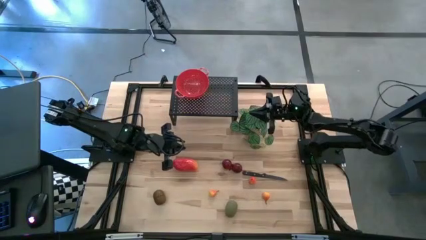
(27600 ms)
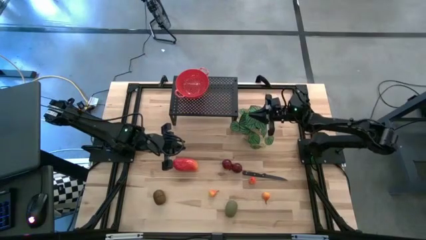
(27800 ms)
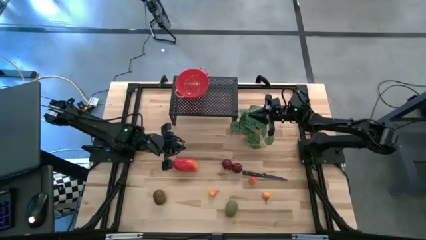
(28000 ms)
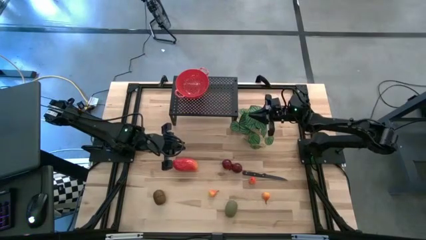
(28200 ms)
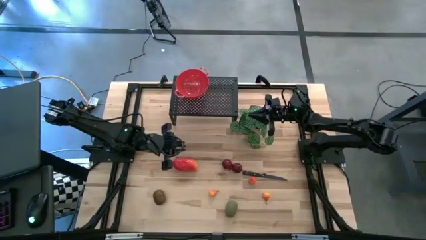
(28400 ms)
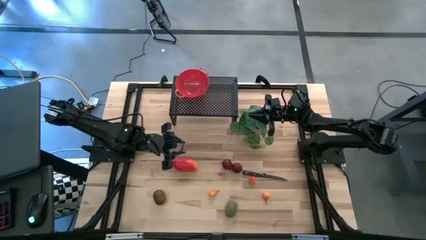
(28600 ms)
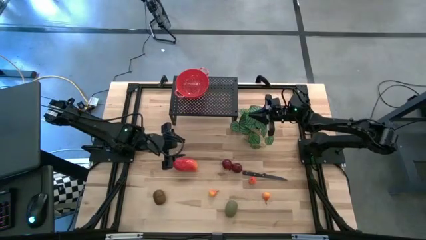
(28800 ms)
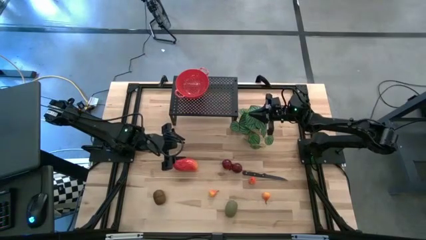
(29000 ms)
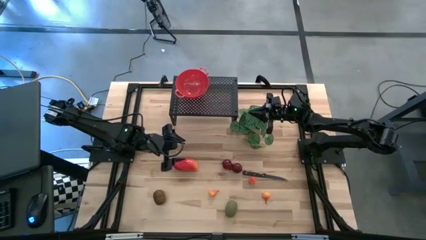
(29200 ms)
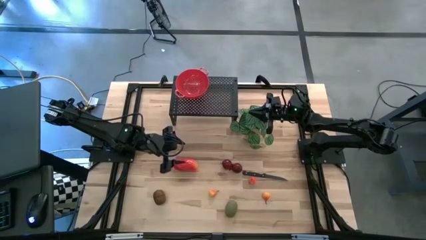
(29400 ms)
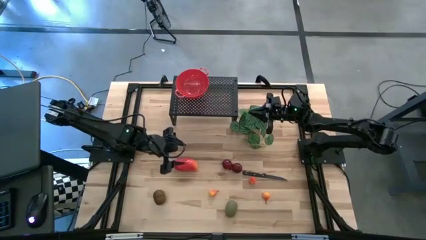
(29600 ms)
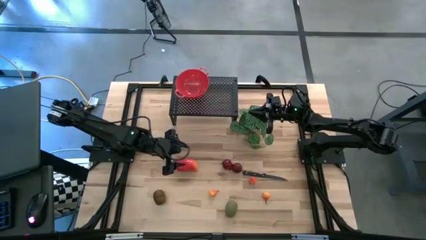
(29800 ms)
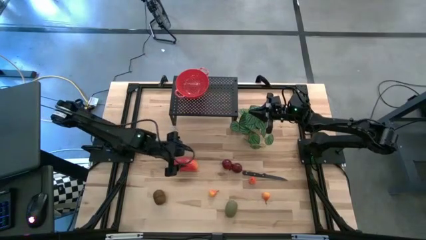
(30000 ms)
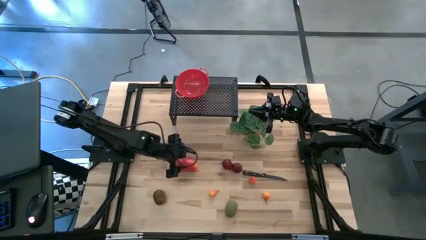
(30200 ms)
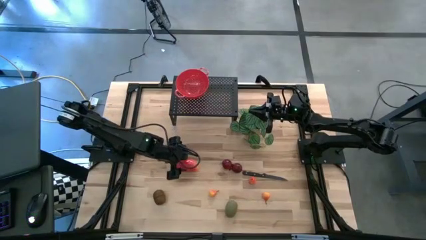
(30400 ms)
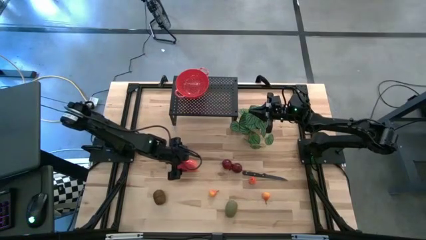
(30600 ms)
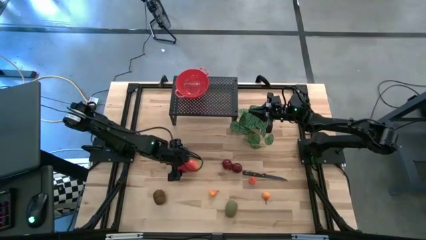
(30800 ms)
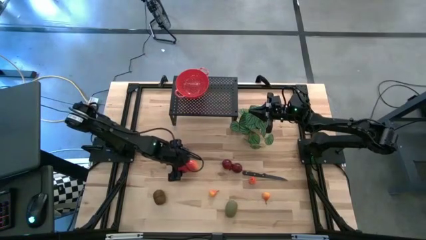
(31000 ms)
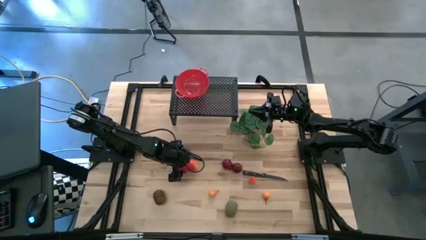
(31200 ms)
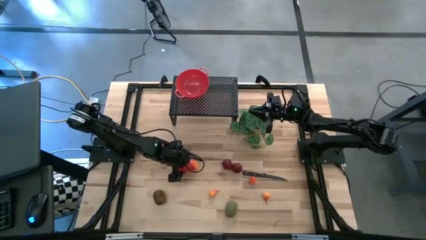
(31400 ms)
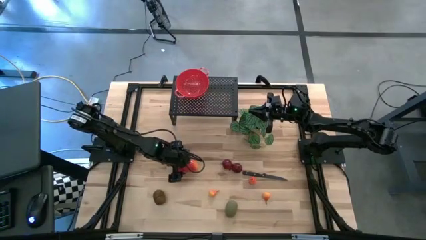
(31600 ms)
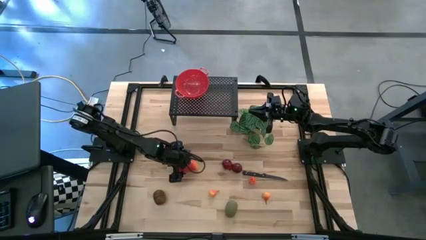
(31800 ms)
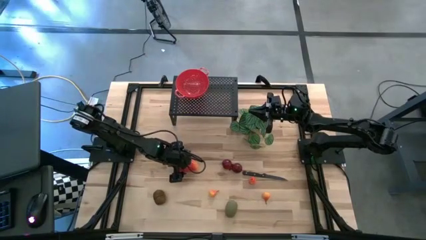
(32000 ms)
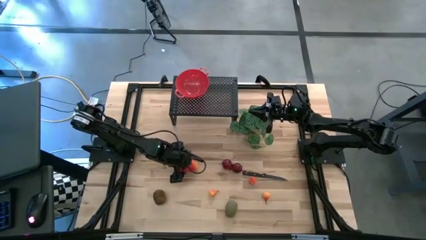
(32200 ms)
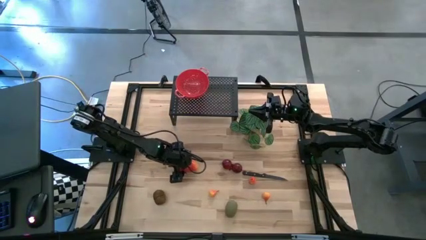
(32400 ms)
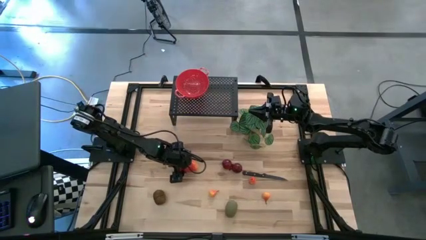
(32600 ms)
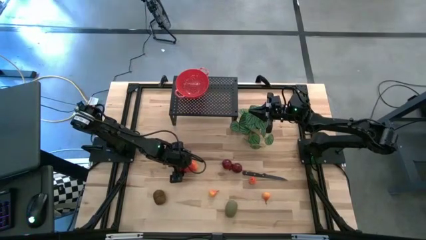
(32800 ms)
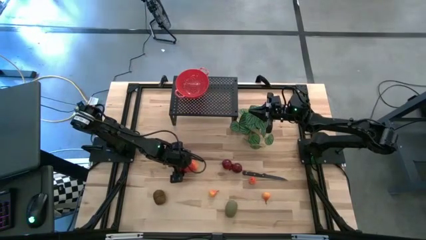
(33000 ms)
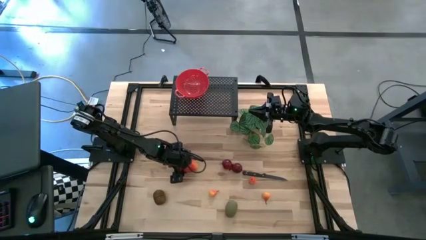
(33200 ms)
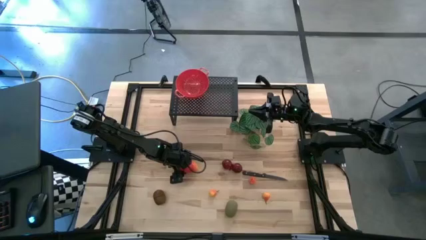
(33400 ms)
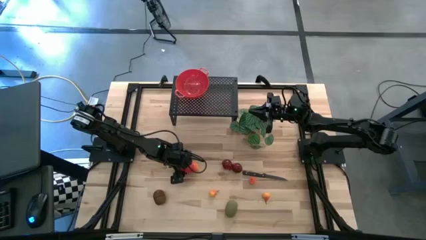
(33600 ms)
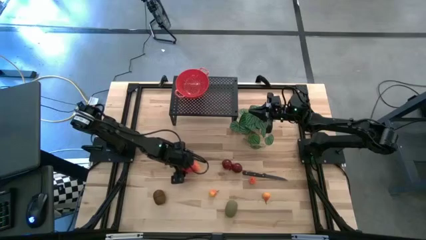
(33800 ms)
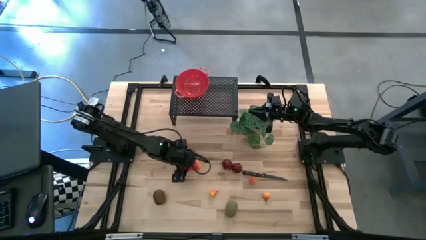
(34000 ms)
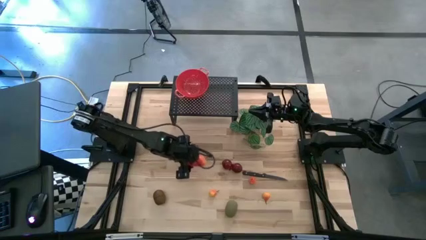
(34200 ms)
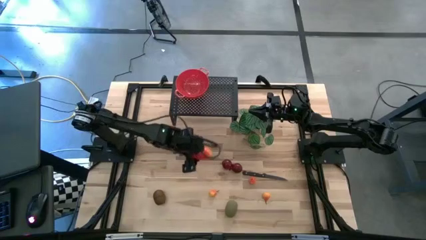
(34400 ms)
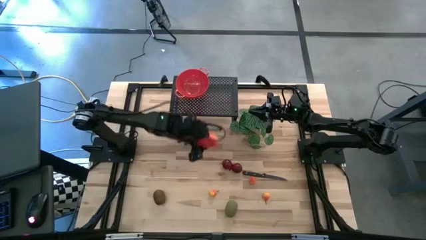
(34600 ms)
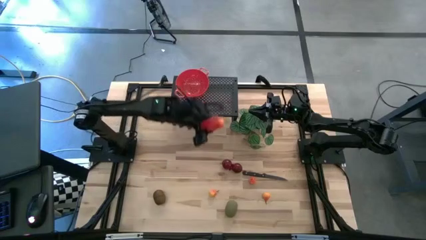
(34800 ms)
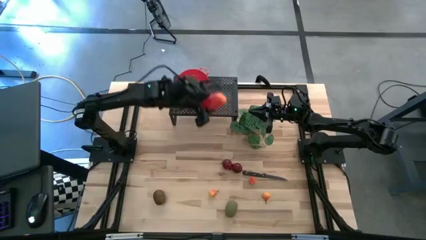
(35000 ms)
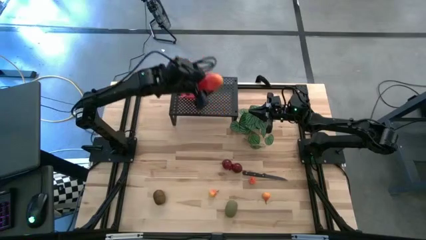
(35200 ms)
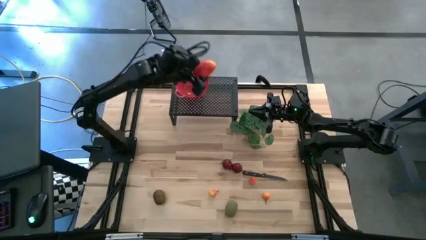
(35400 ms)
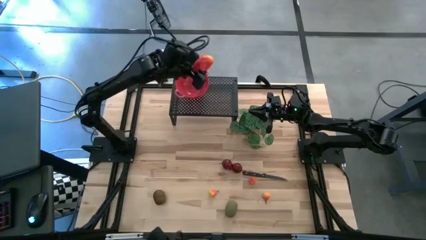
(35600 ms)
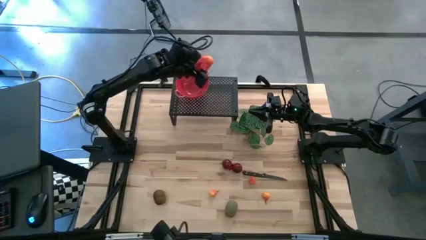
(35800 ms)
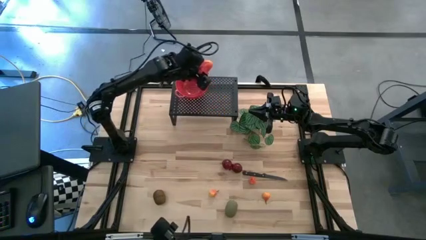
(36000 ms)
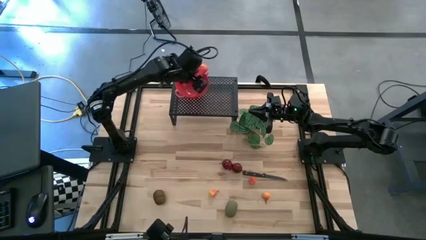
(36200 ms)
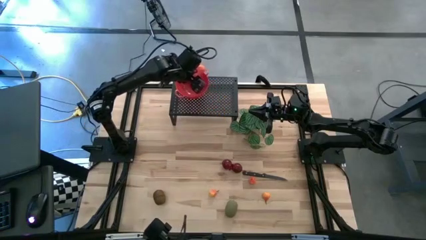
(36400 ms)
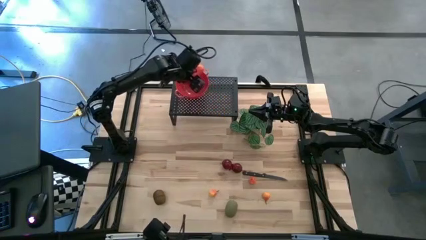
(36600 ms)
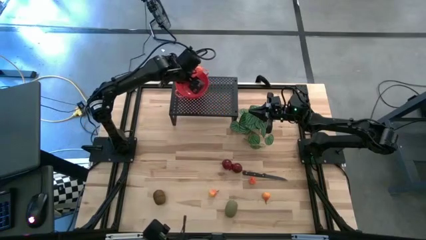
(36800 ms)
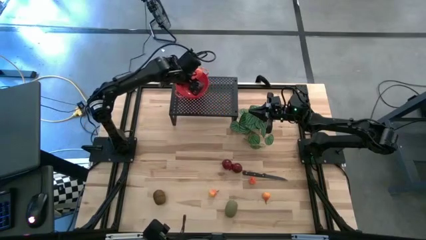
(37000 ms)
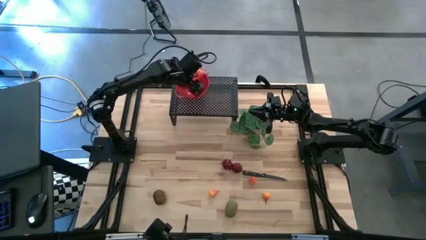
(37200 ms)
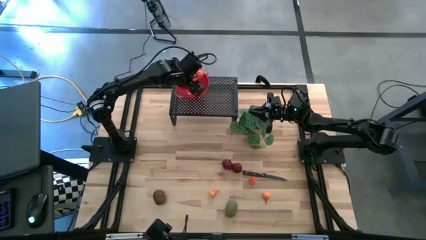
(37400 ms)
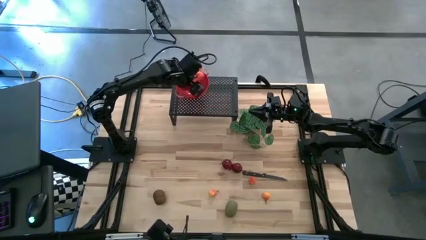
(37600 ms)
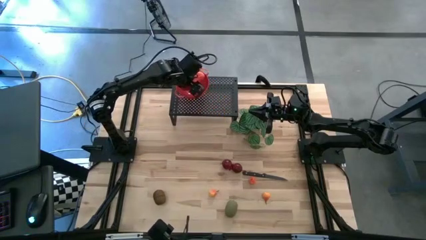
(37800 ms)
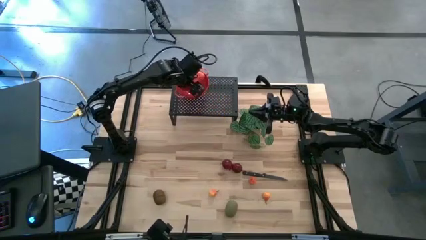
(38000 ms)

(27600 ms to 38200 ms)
Task: Pick & Place Fruit
Put the red mango in the red strainer bowl on the shelf
